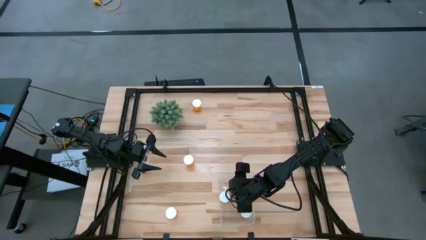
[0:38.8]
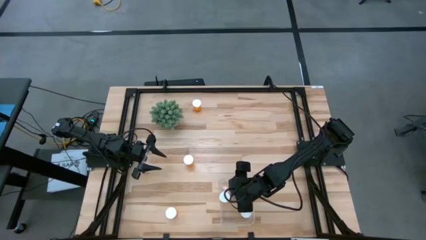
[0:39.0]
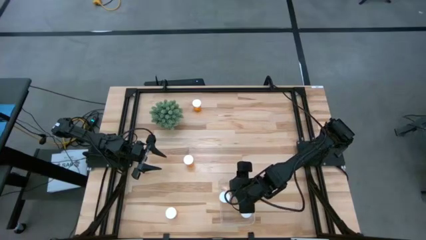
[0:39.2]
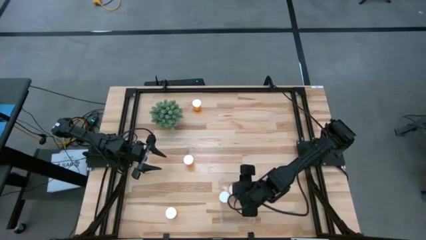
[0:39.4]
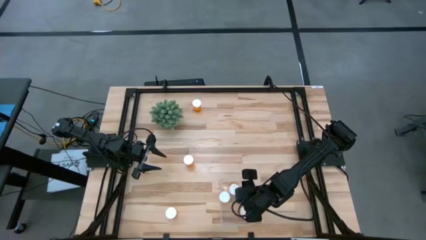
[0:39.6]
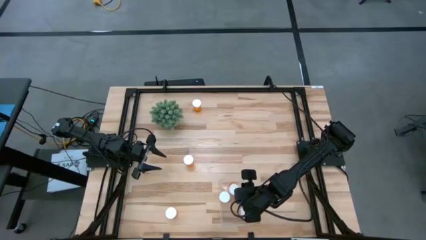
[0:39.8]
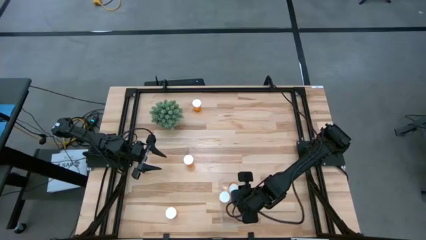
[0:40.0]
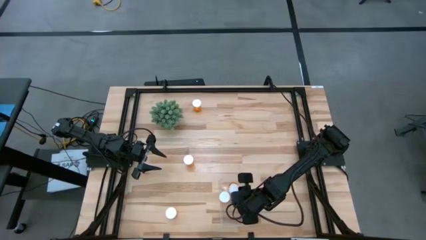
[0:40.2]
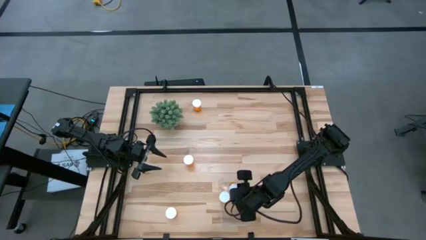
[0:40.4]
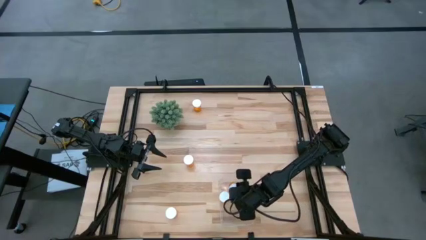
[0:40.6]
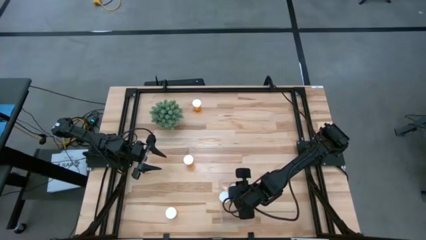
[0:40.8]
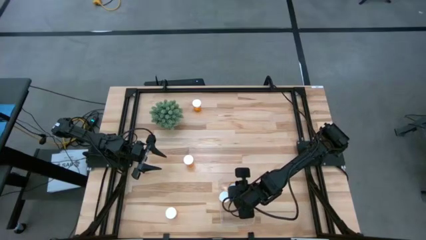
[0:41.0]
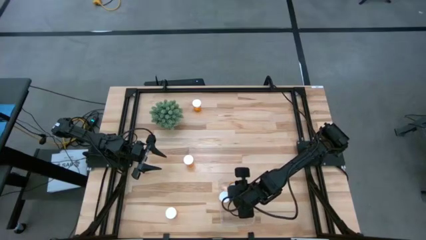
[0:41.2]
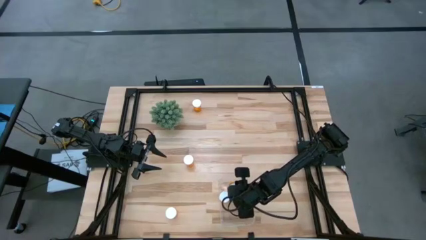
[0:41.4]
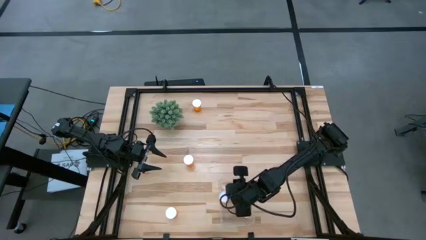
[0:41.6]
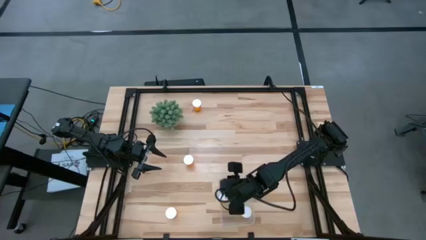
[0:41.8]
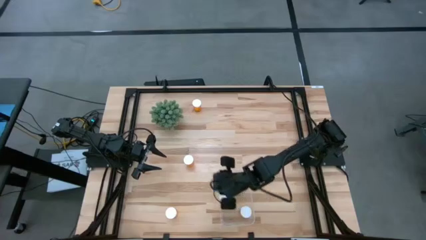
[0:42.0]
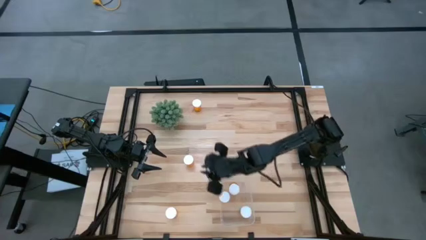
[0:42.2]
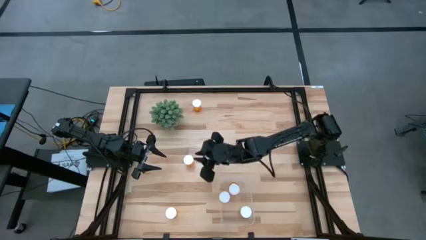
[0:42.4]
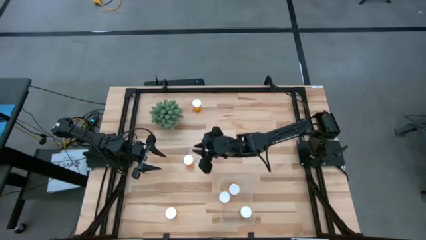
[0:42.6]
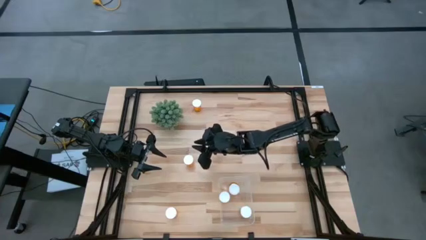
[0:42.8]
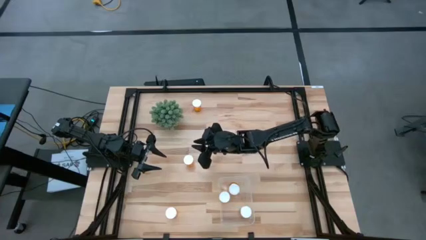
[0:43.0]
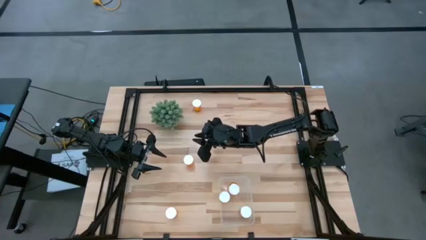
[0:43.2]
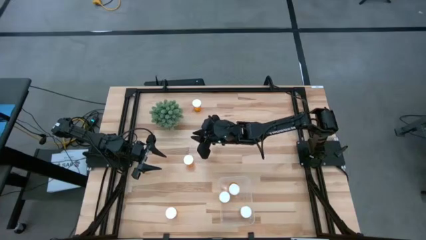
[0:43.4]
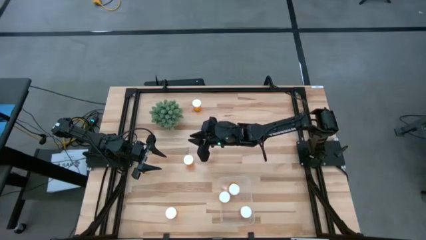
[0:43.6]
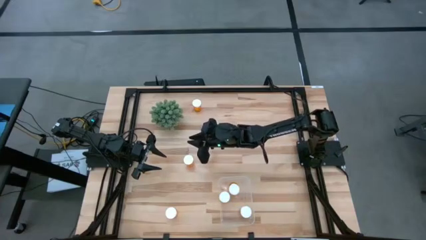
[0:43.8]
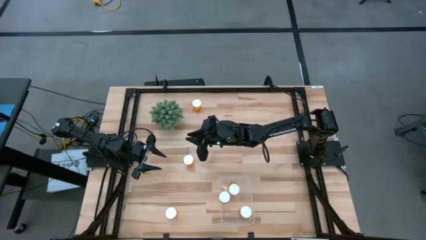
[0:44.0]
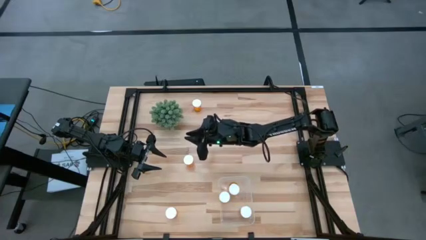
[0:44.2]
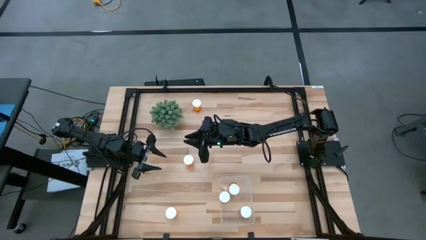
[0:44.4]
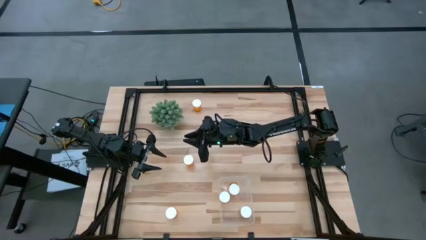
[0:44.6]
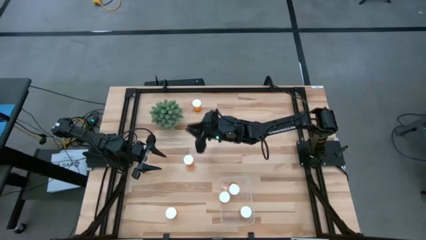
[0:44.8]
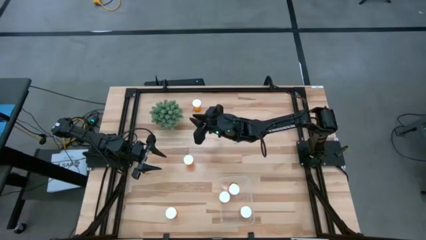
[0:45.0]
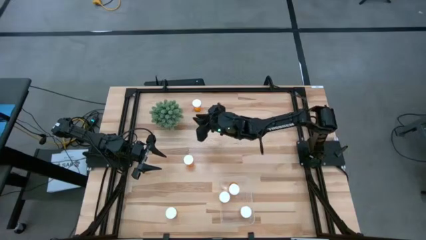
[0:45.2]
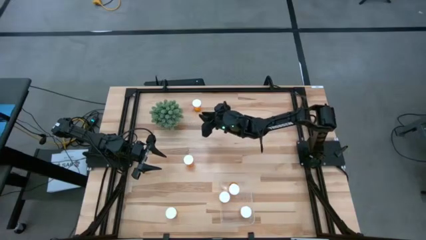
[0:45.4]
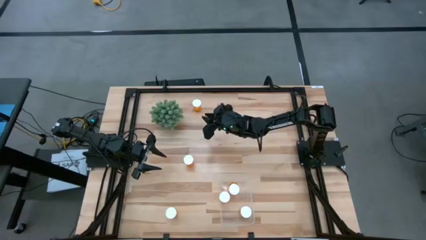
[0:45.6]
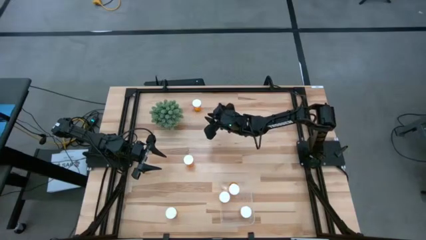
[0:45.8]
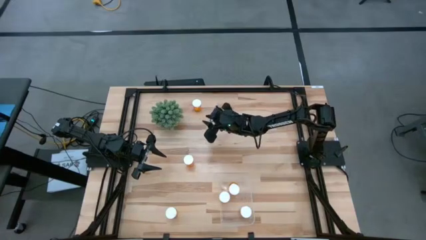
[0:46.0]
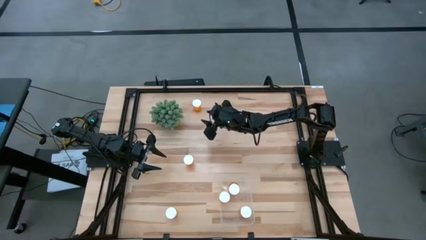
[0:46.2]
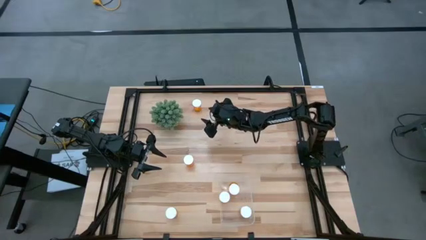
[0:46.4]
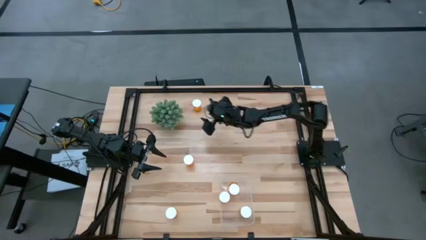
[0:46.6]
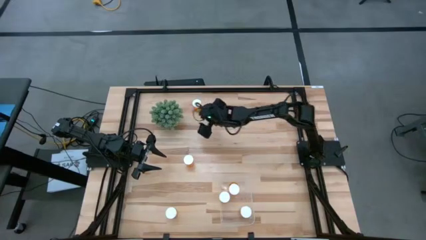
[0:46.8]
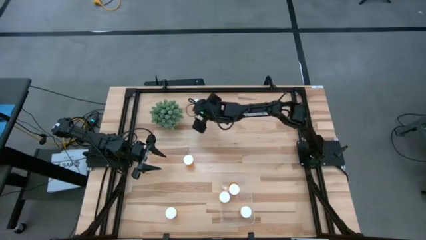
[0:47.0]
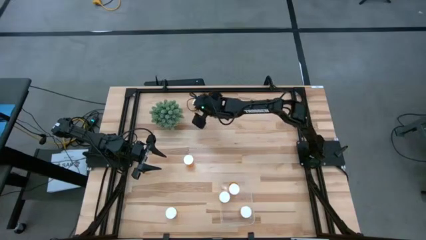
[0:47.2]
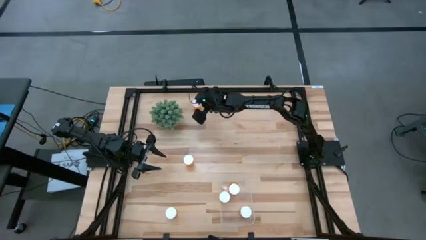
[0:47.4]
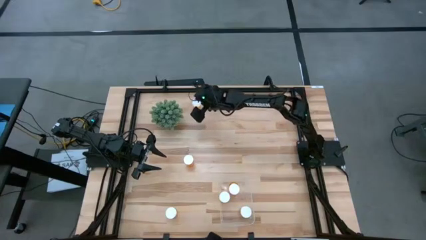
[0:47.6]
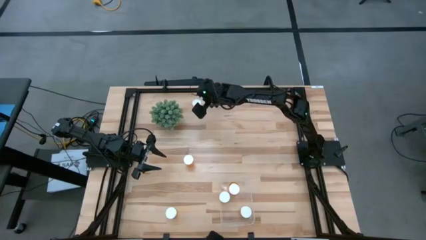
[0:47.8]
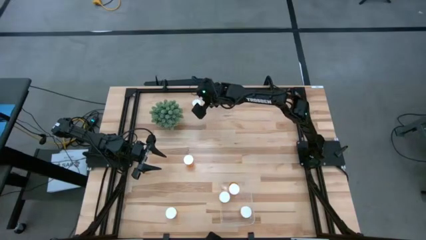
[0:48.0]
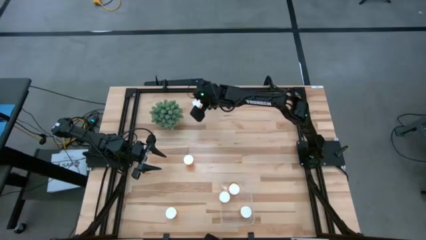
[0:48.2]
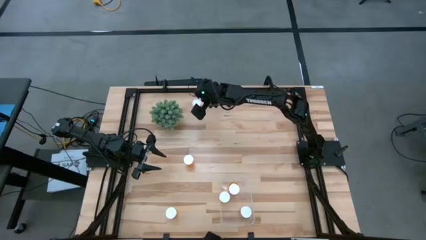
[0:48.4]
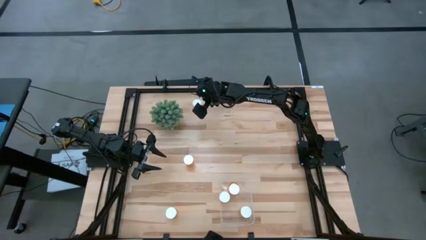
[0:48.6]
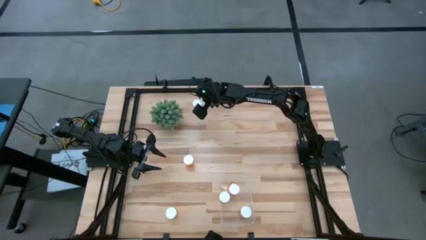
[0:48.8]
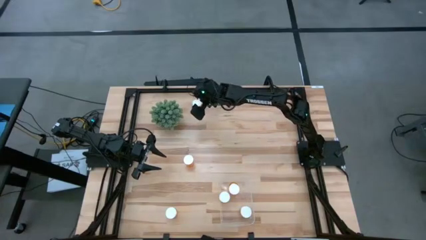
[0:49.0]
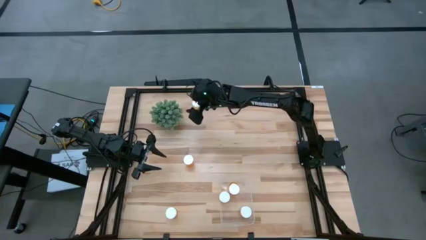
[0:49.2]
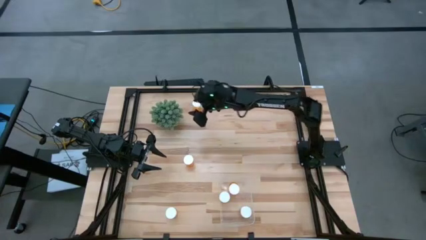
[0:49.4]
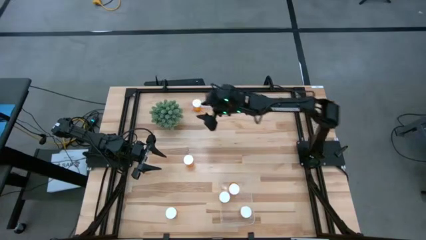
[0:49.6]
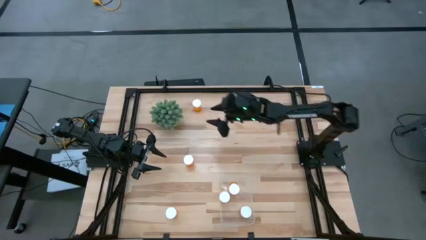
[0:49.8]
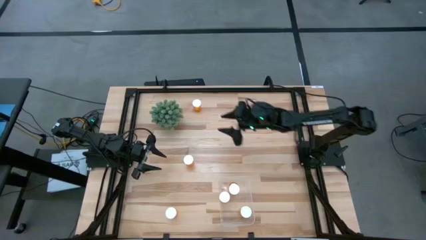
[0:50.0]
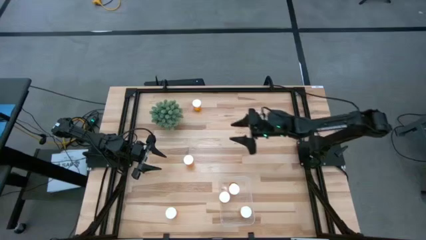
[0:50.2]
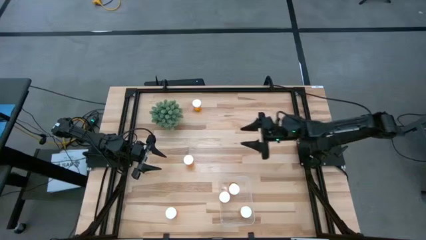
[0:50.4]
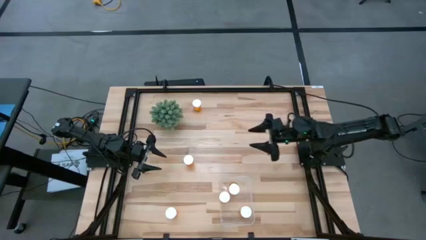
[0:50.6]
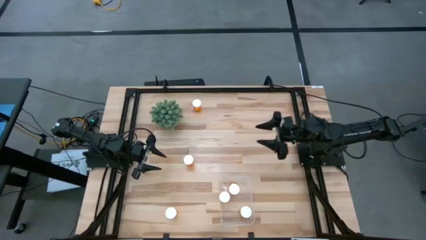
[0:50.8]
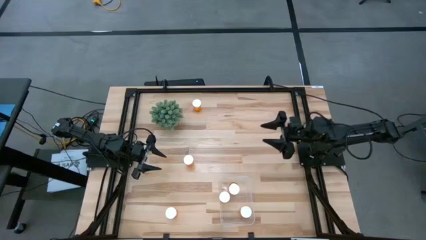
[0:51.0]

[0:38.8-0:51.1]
Task: Pick and place pill bottles into a basket
Put the top orange pill bottle into the transparent bin

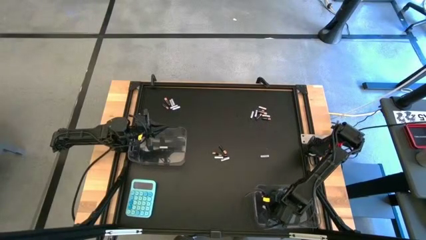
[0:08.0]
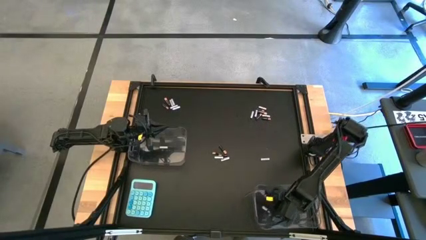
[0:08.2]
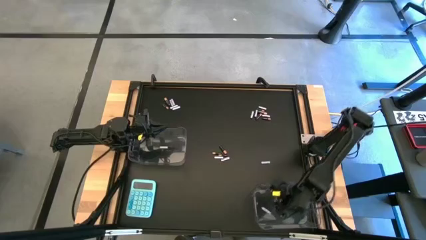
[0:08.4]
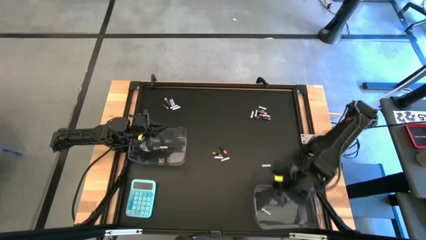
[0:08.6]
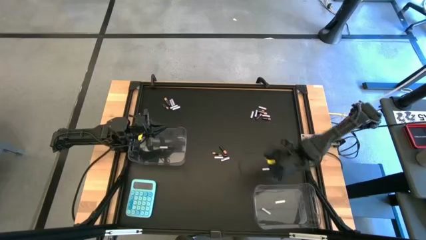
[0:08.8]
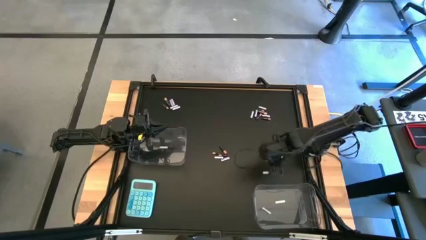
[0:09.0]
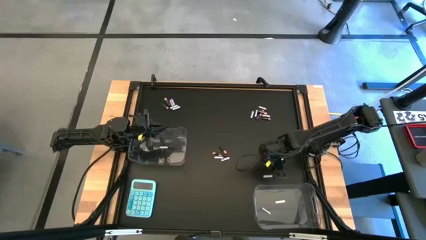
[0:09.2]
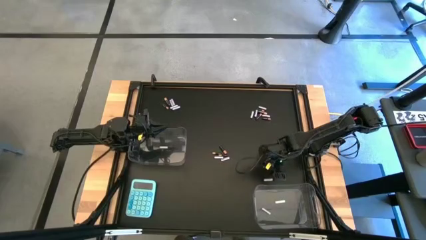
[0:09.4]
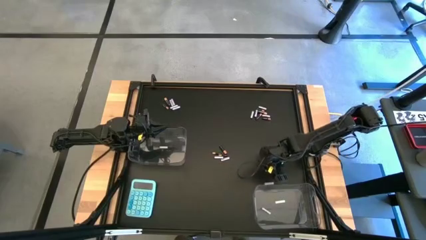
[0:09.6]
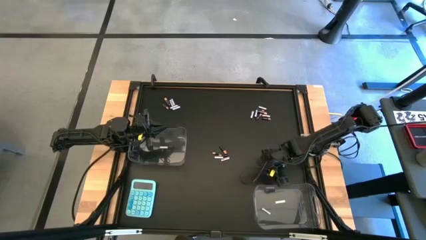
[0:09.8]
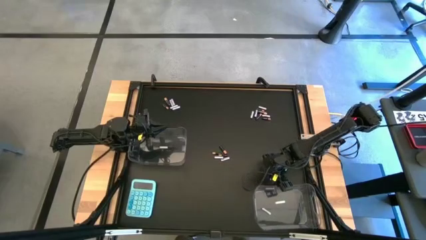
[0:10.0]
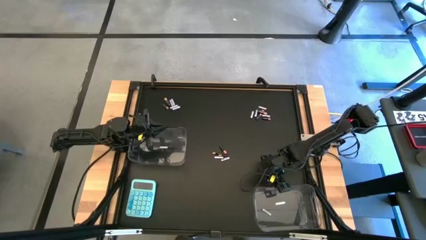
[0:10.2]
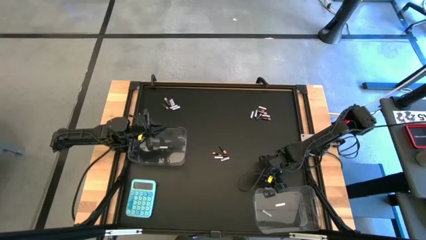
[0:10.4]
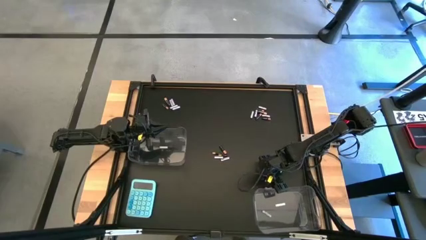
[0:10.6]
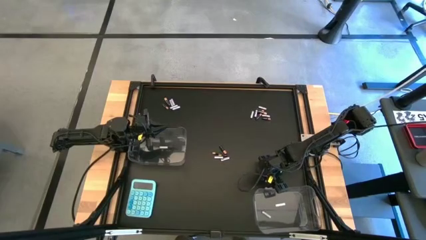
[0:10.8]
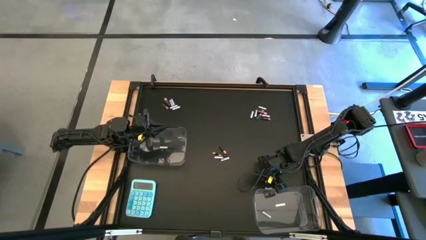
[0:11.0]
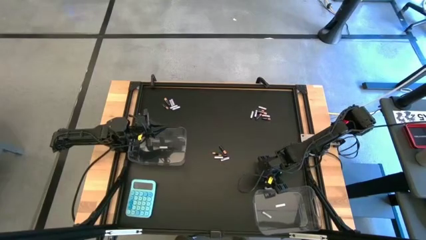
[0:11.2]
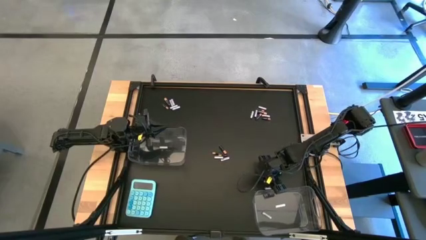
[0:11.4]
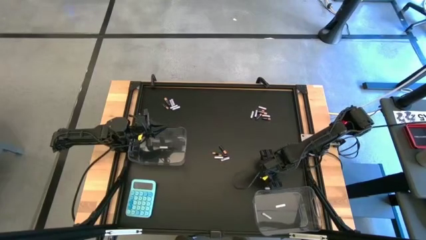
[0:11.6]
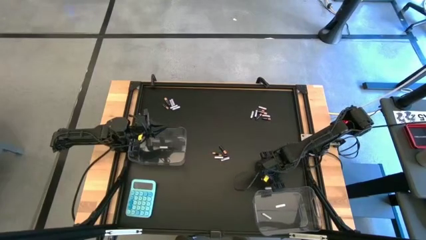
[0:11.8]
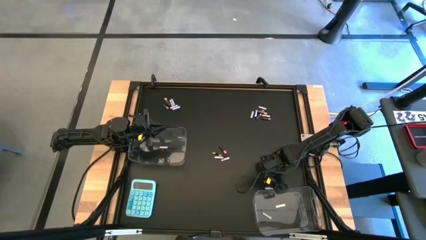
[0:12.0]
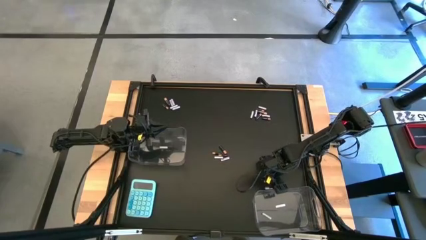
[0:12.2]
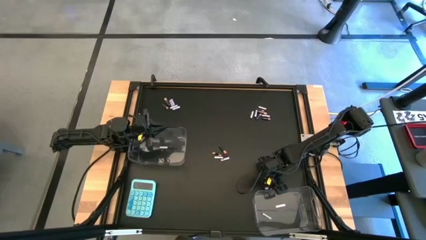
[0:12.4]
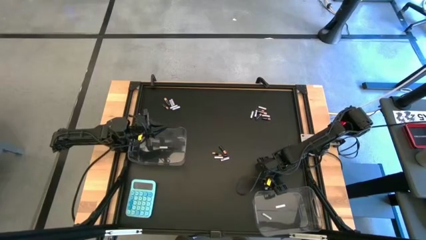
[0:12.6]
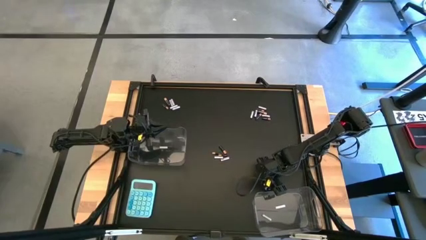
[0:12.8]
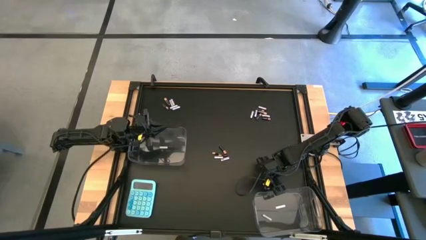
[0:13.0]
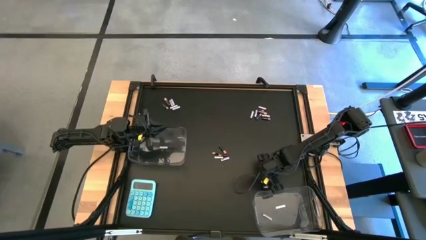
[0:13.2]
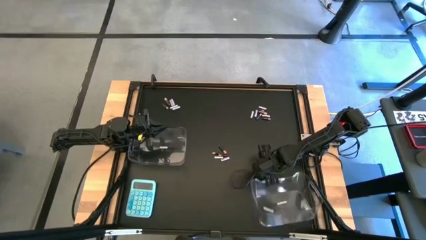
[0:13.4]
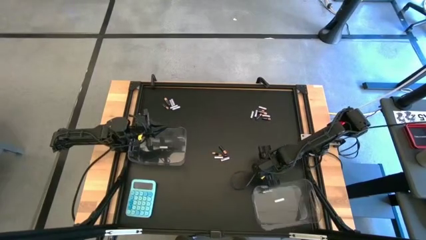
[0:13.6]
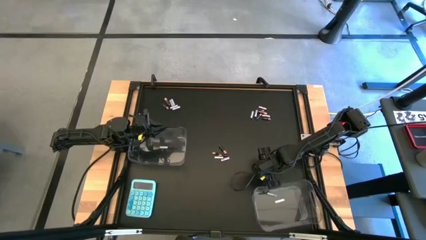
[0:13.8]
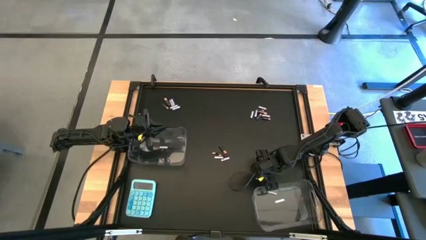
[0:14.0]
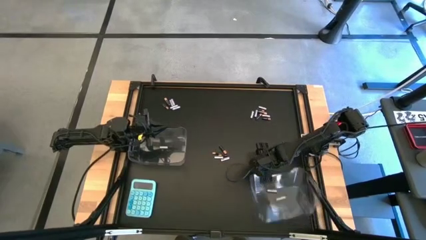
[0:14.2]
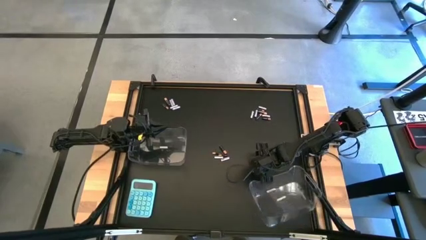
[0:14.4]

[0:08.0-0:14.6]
Task: Sort batteries
Put the white battery into the right transparent bin
